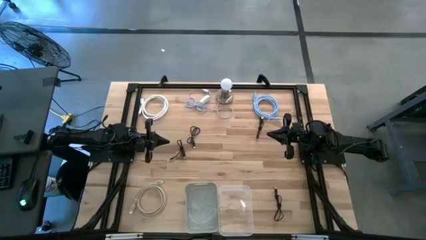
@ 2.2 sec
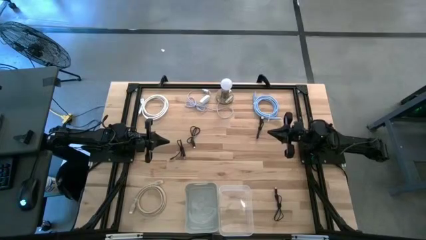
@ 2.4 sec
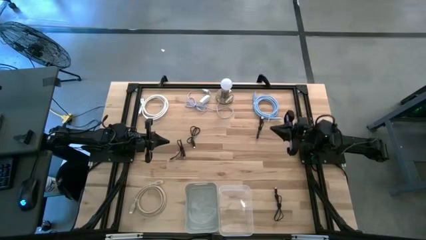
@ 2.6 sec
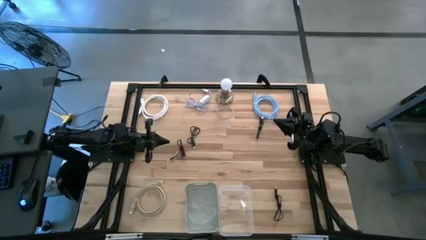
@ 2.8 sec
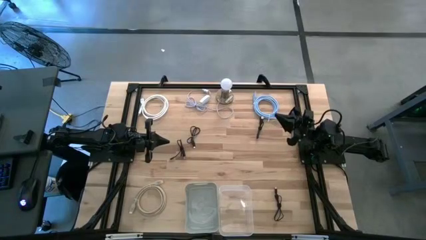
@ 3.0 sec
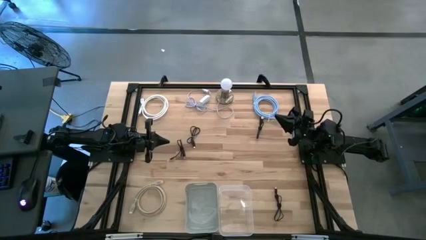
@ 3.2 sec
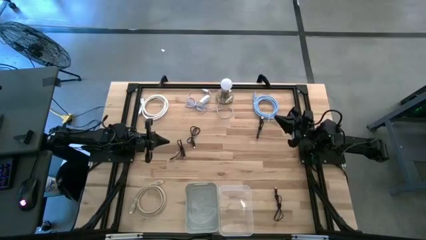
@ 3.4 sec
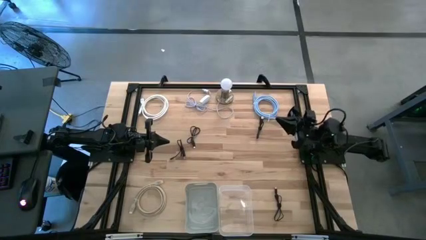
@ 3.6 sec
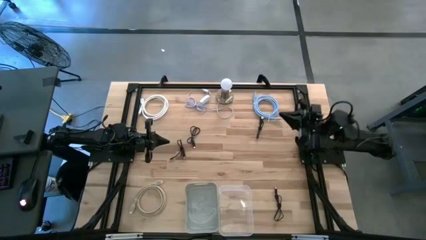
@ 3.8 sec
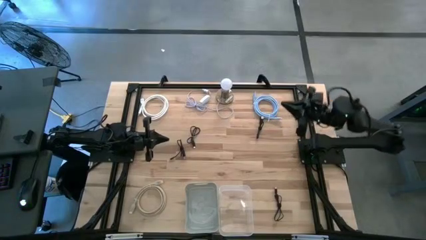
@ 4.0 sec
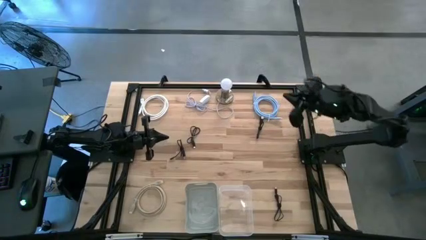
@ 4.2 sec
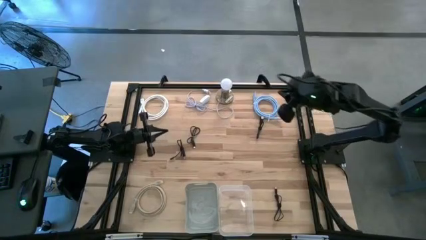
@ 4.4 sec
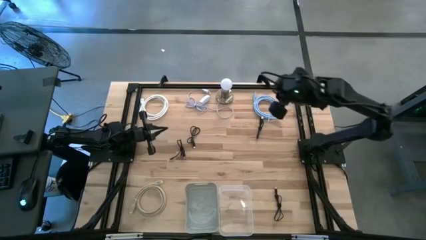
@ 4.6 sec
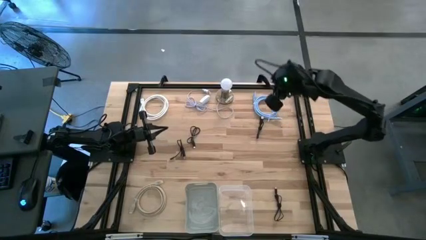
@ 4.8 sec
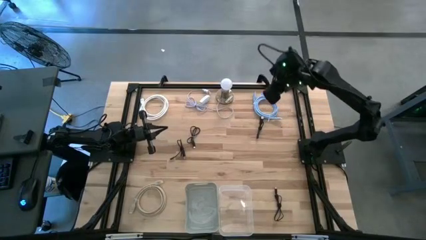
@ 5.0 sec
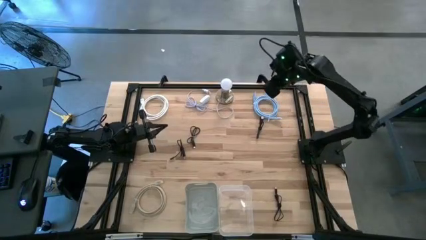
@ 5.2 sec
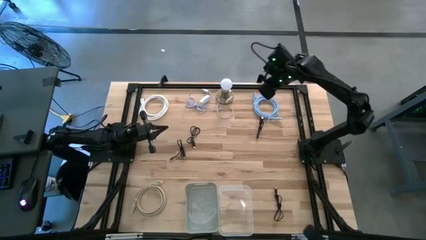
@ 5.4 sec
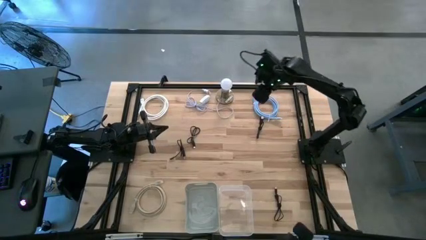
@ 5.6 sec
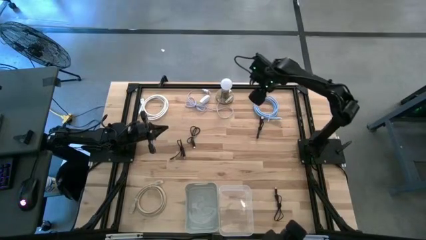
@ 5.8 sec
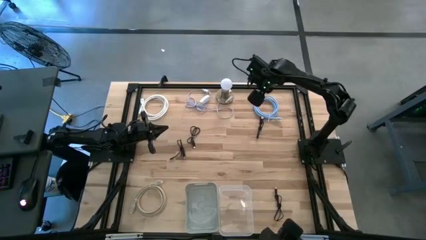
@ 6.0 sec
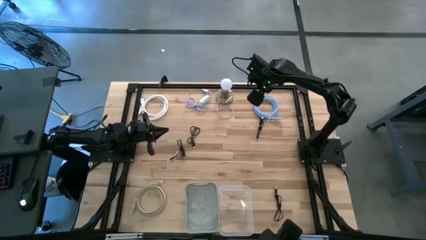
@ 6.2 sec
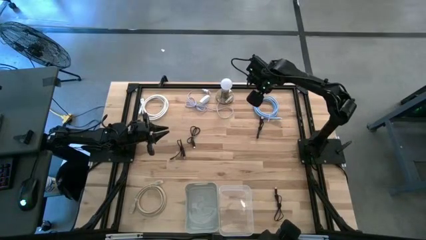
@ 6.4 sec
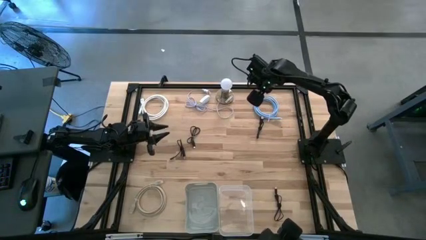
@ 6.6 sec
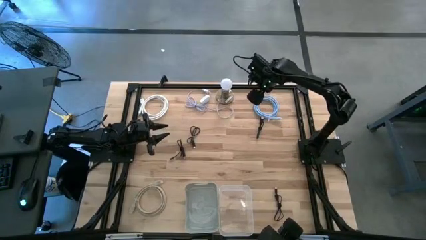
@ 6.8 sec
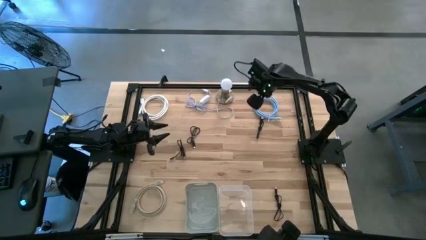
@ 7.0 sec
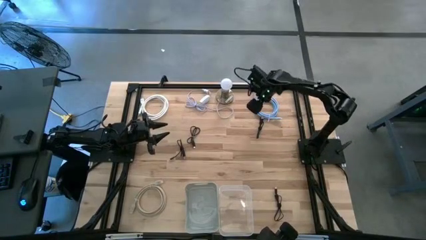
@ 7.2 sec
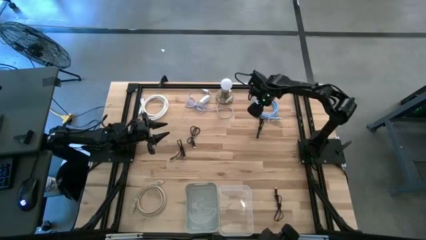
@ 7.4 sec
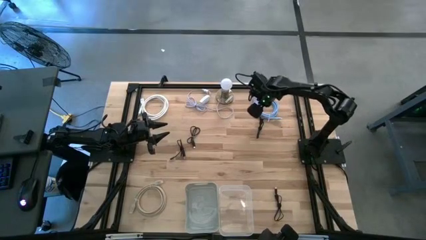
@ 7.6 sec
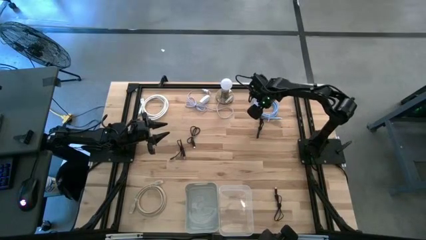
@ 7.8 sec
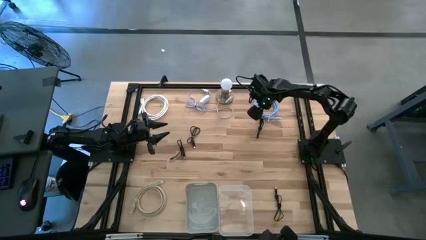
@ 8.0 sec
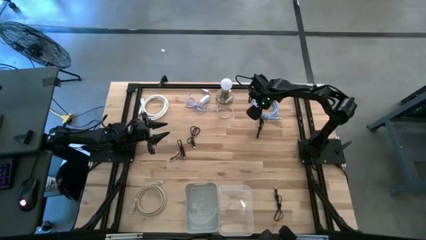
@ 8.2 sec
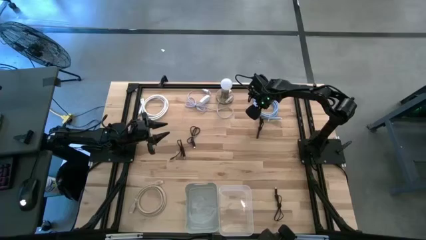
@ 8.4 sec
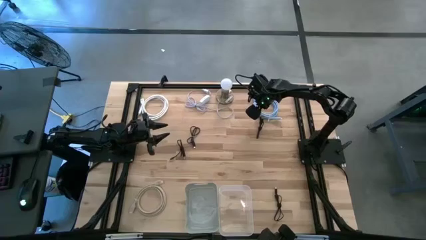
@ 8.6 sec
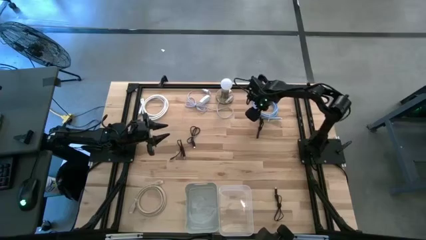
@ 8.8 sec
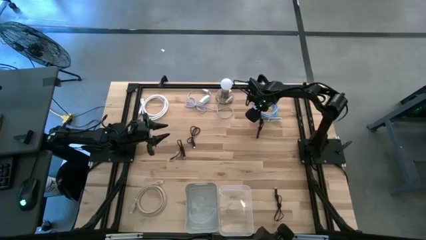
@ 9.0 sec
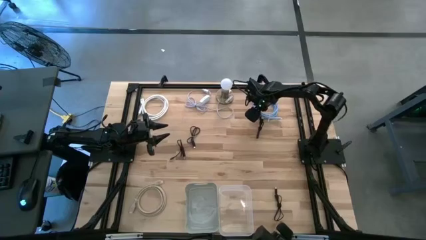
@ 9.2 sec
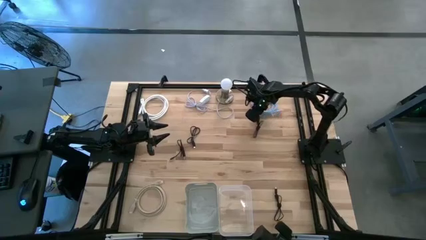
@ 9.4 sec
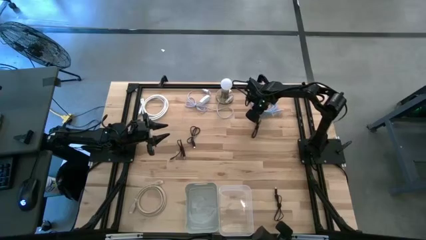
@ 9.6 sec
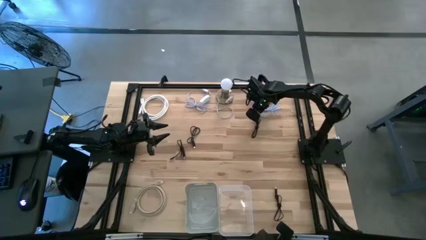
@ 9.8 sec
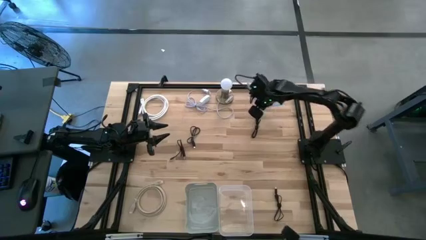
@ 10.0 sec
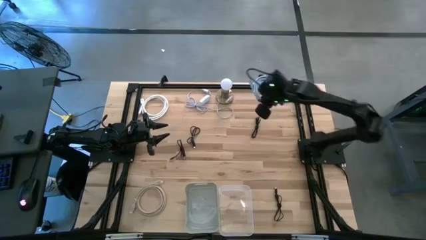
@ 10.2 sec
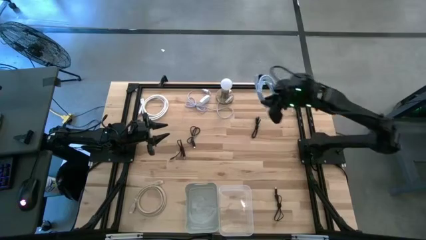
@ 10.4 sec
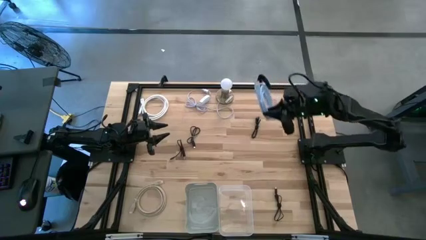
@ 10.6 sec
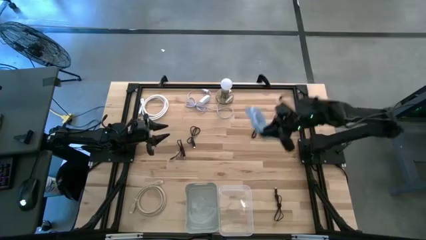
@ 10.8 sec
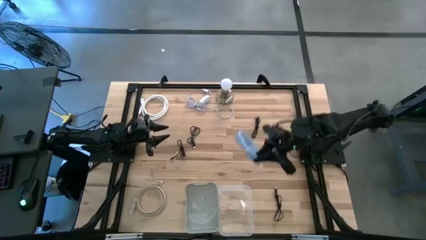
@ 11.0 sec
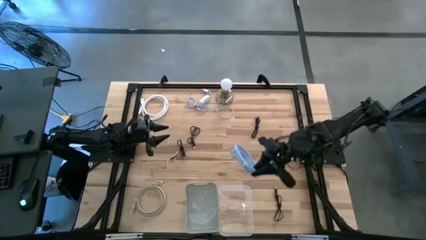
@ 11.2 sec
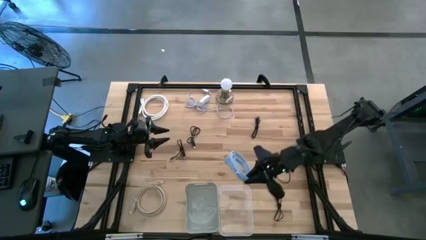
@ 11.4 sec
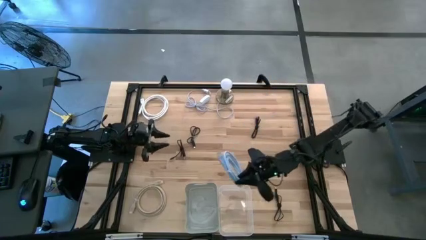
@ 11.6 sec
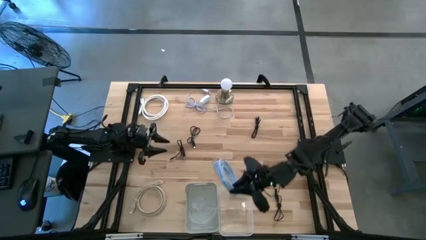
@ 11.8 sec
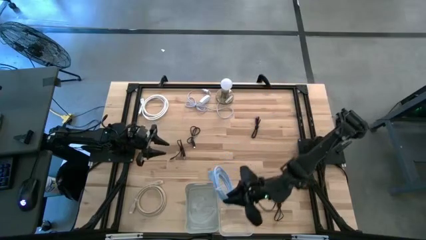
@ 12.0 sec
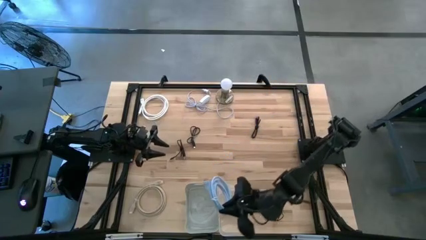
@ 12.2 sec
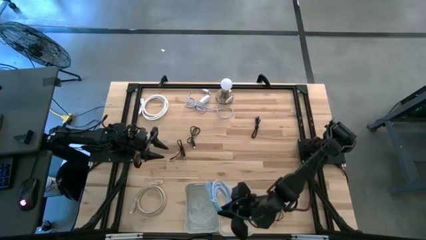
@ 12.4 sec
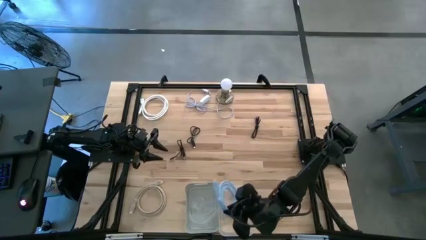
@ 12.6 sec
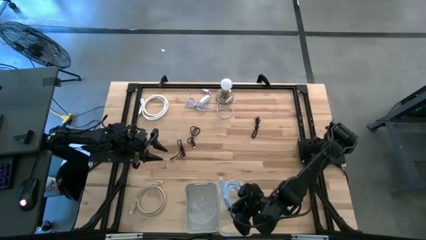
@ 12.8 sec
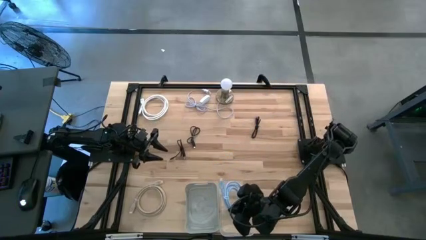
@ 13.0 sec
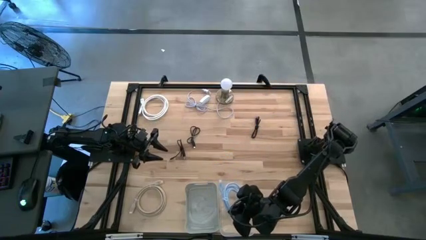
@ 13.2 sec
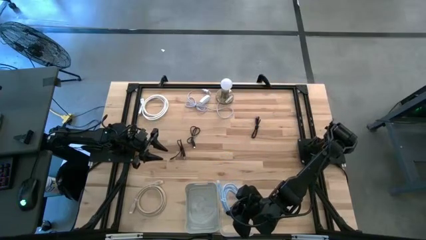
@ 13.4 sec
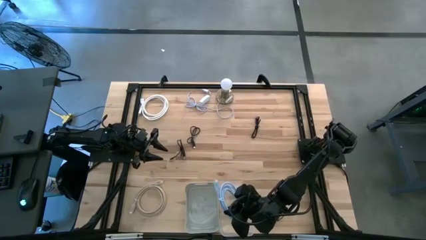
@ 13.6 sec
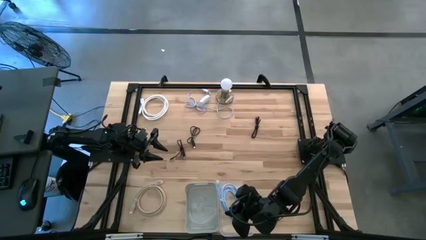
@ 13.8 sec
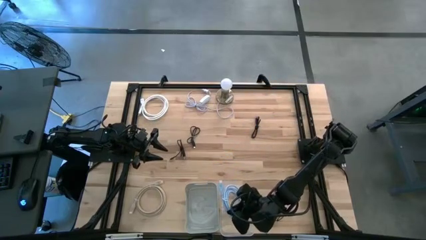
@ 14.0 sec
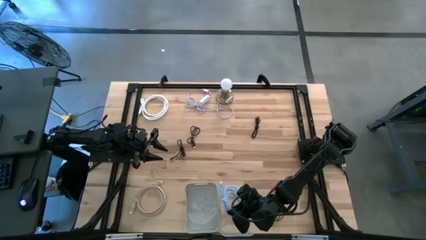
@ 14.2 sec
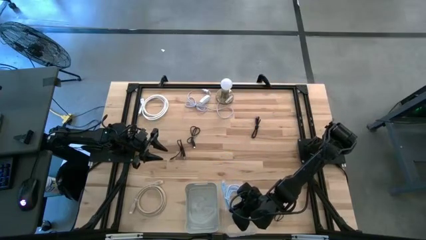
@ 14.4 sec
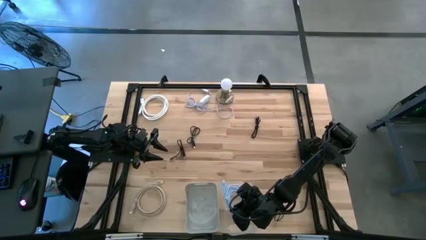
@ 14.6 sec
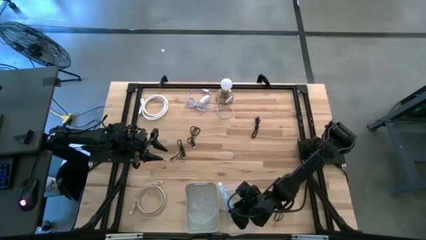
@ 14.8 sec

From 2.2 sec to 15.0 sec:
Task: Pick & Place USB Port
Put the blue HDMI cable into the transparent bin
